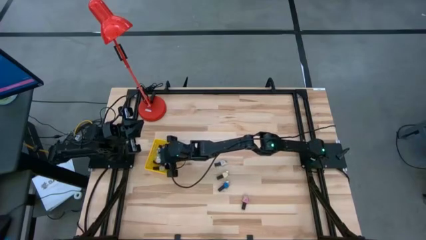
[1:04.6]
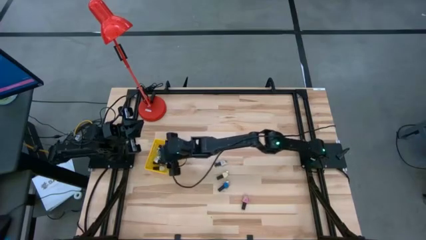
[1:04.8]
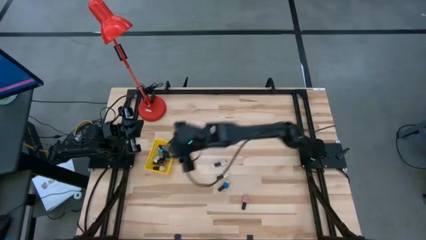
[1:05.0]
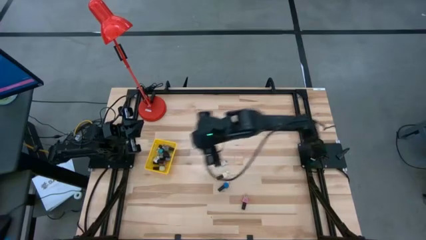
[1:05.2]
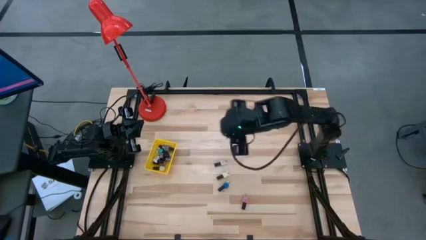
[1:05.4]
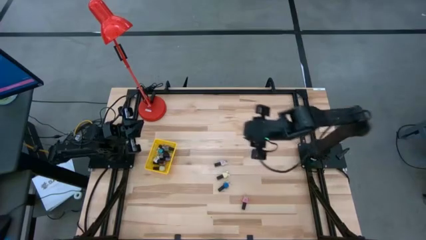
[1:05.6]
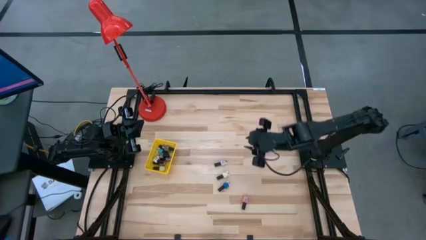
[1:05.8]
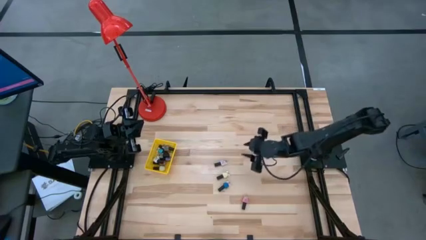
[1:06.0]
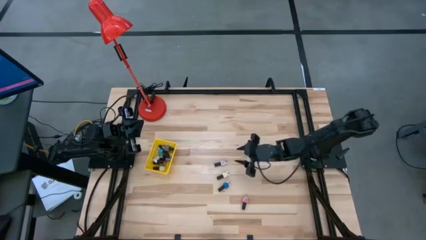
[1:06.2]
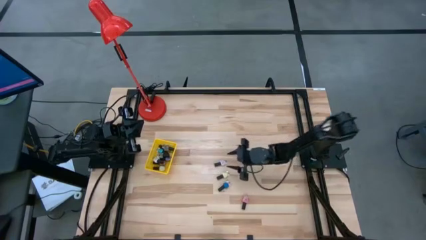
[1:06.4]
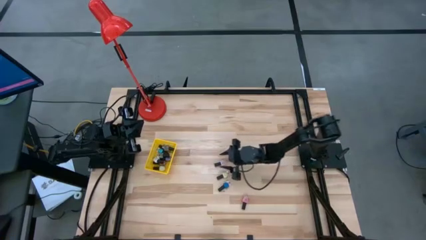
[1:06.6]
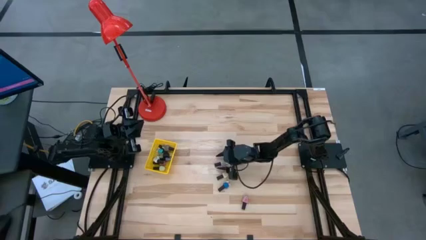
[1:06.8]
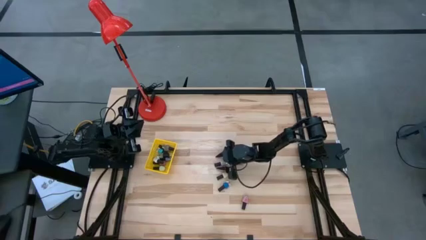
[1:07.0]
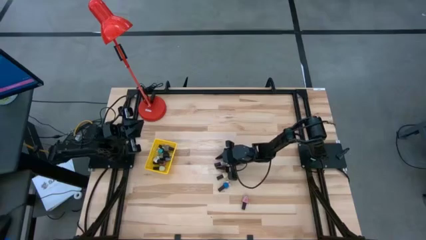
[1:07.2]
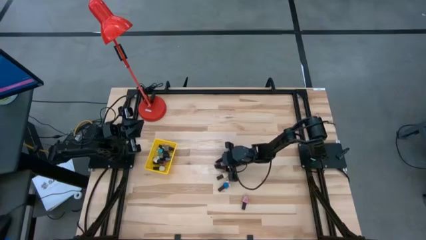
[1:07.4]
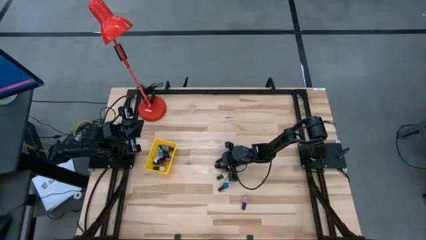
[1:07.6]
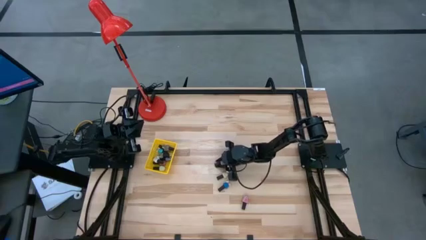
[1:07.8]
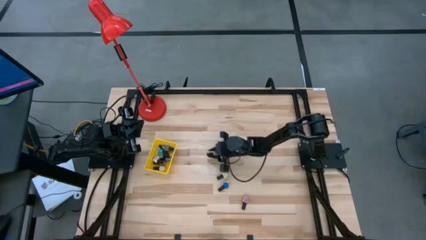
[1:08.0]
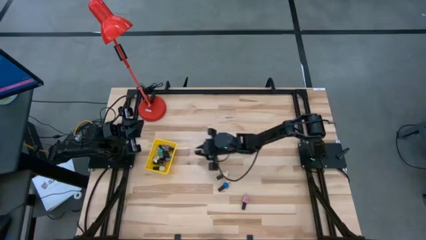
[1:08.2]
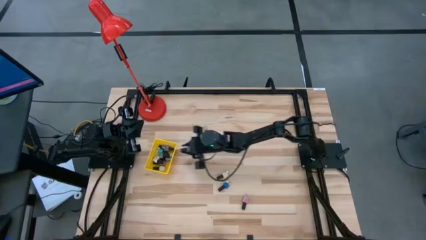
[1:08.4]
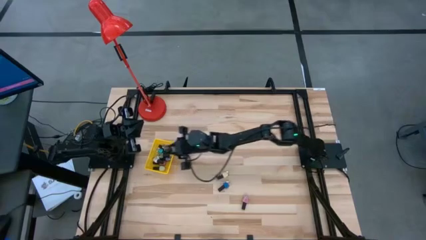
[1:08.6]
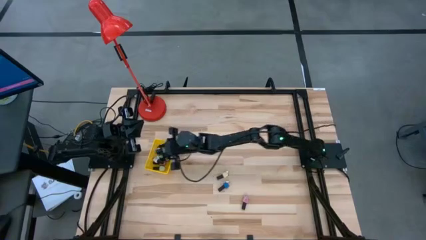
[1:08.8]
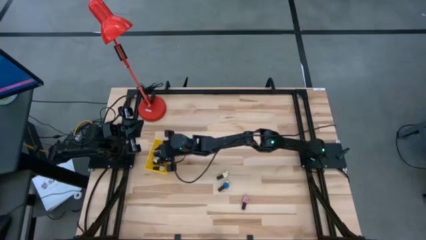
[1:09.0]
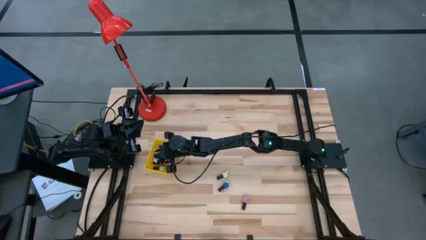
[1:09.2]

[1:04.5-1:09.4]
Task: Pick & Place Nail Polish
Put the silver nail polish bottle into the yellow basket

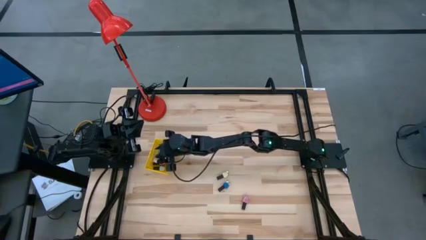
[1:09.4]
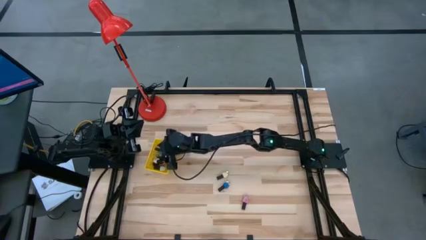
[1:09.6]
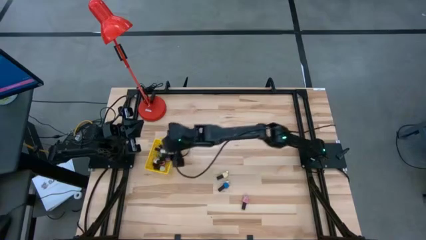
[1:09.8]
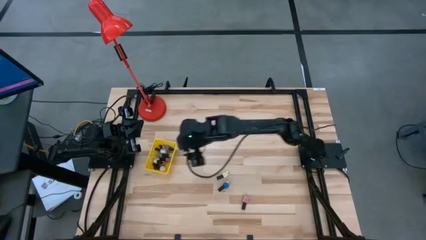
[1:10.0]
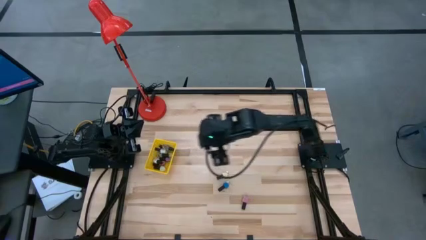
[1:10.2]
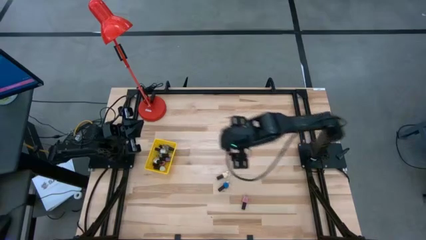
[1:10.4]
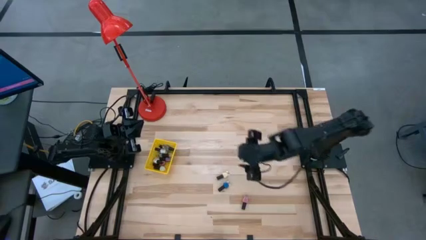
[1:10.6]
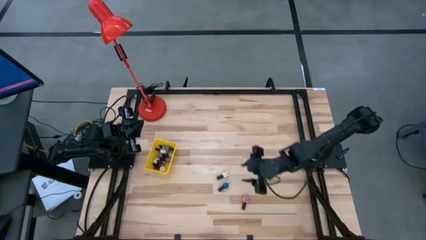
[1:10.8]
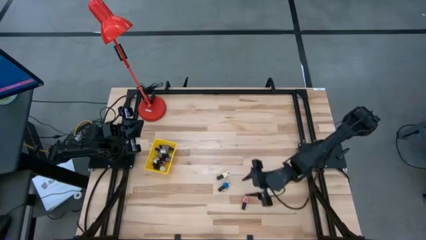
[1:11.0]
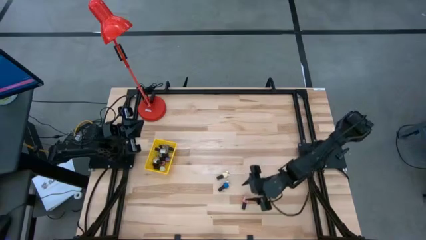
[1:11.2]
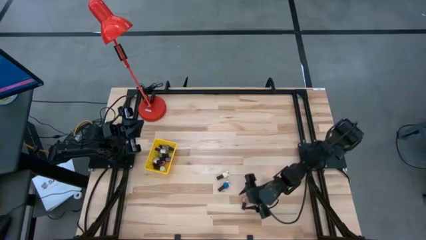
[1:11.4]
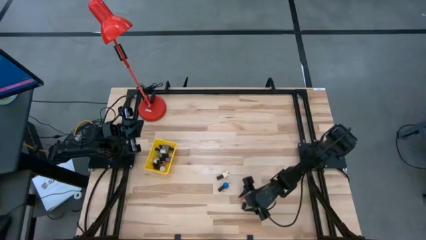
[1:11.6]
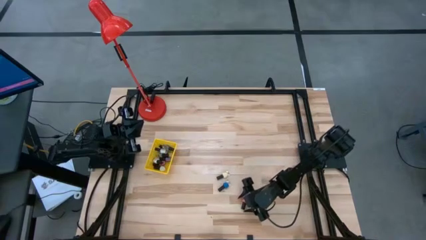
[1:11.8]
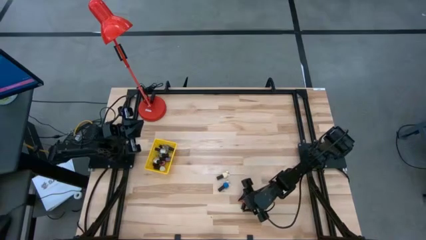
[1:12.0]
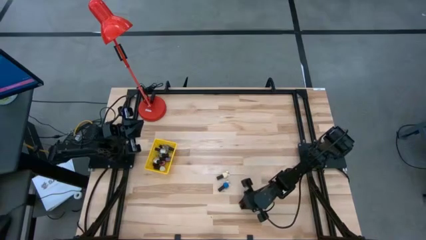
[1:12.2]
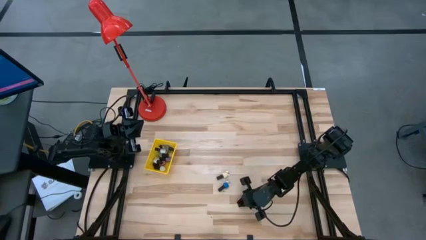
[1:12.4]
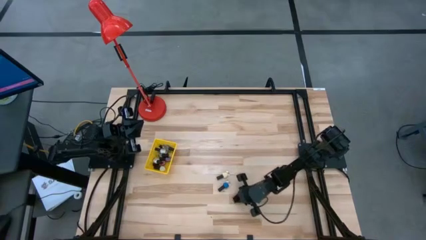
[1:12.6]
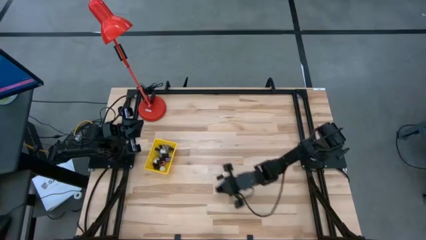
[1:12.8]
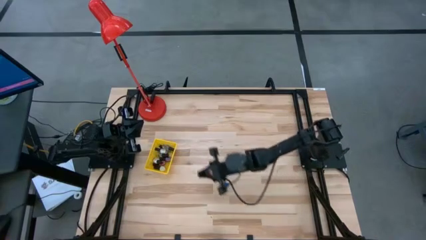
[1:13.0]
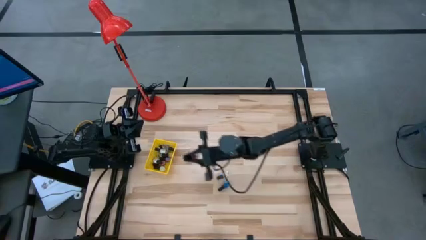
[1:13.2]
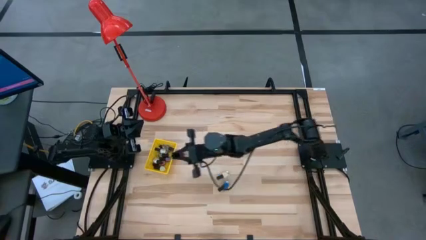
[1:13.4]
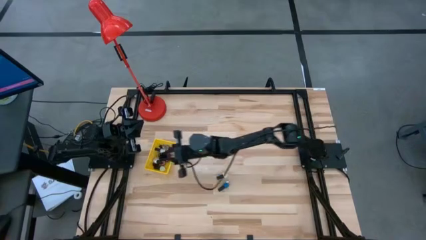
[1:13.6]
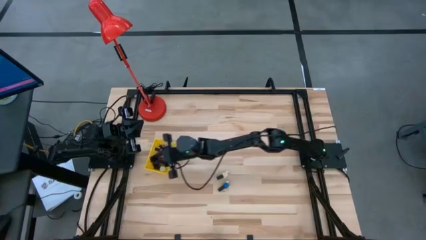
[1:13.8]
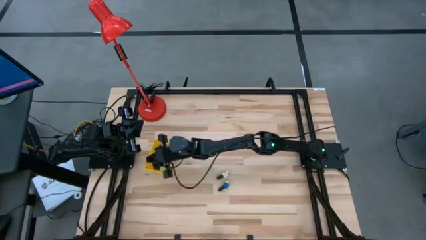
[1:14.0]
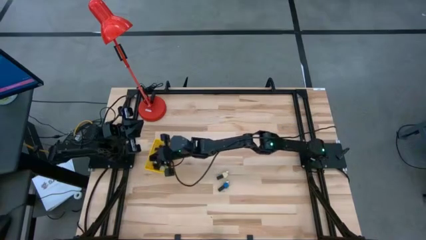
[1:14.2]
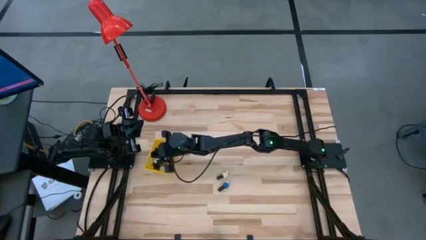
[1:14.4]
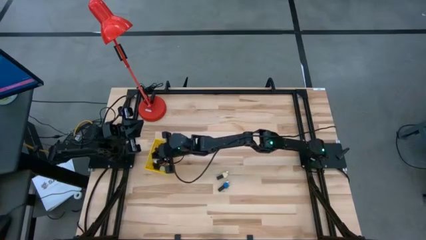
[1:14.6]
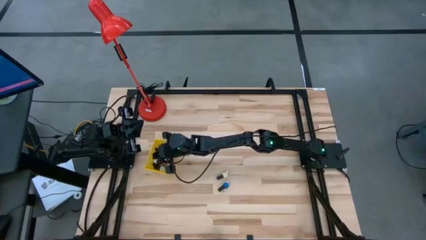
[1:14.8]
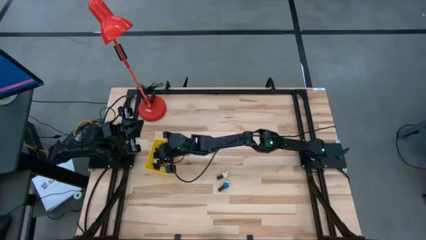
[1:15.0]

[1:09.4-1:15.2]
Put the pink nail polish bottle into the yellow basket

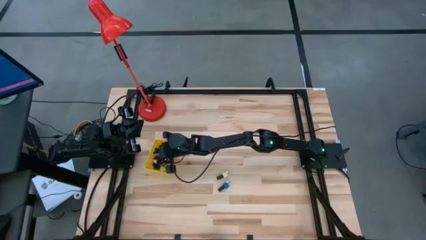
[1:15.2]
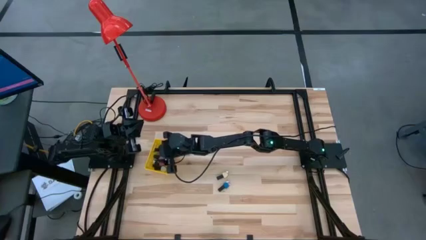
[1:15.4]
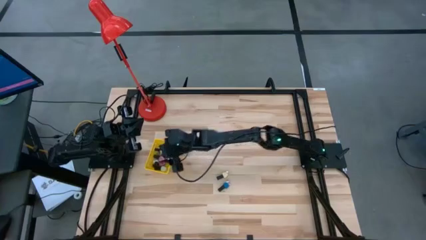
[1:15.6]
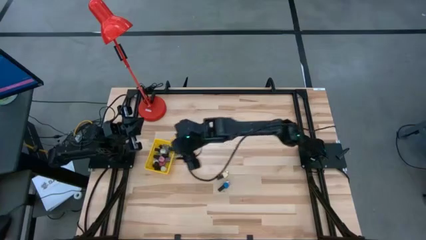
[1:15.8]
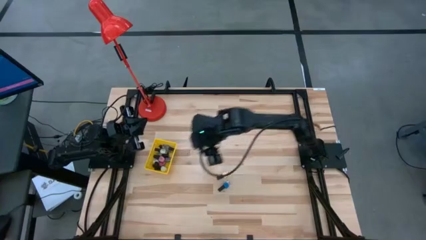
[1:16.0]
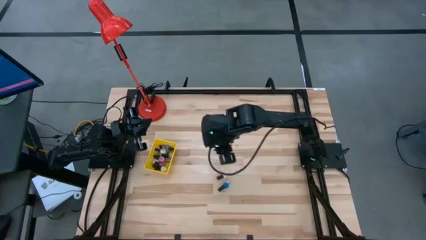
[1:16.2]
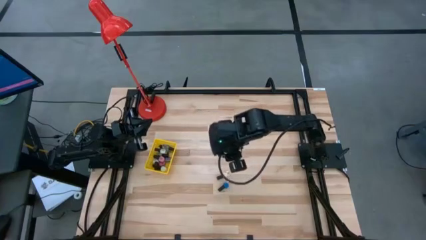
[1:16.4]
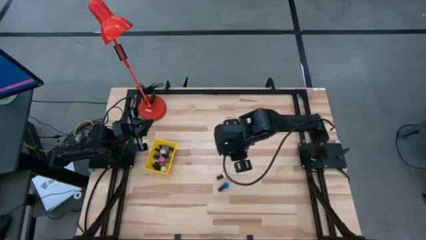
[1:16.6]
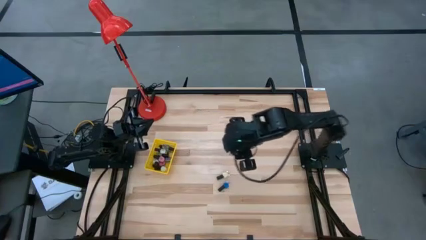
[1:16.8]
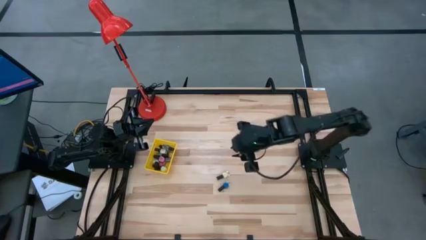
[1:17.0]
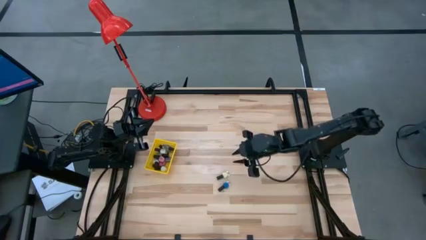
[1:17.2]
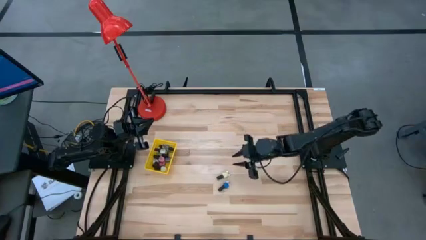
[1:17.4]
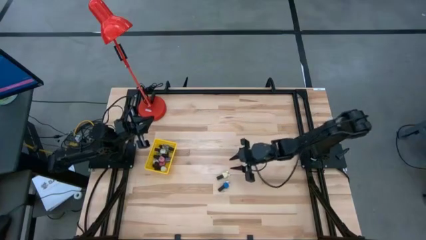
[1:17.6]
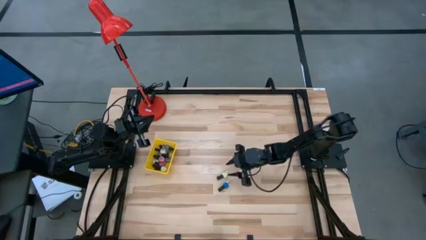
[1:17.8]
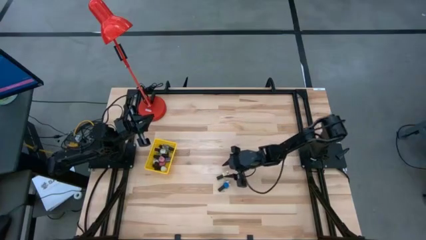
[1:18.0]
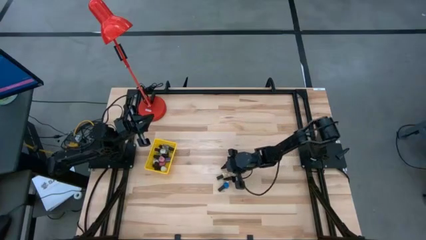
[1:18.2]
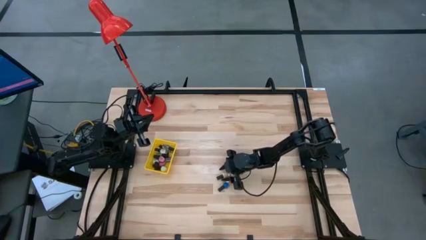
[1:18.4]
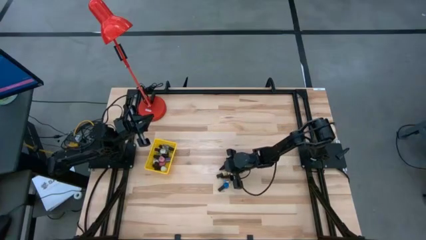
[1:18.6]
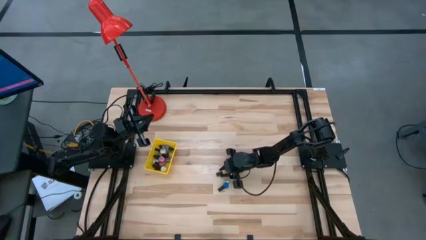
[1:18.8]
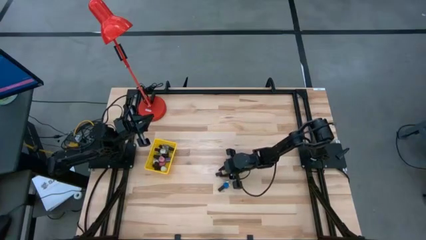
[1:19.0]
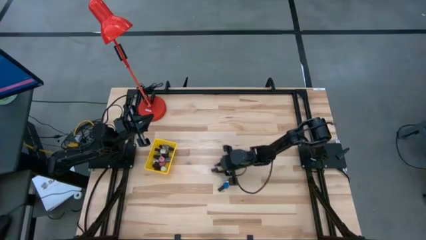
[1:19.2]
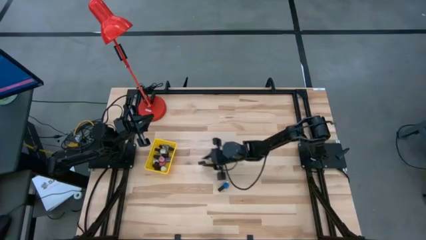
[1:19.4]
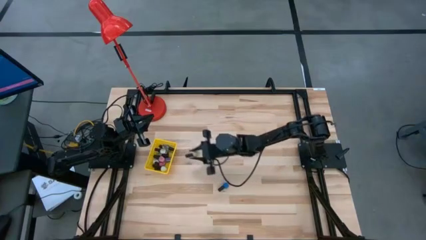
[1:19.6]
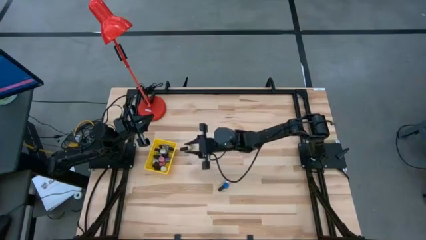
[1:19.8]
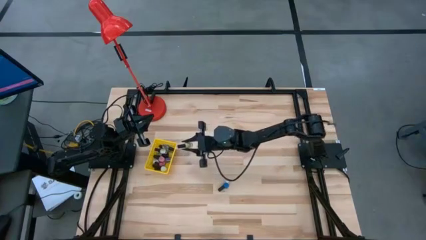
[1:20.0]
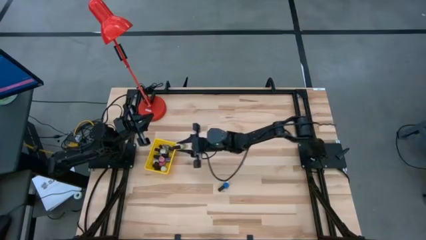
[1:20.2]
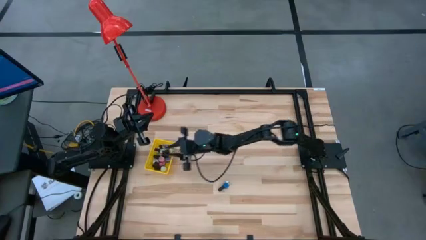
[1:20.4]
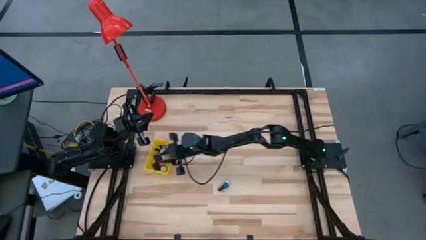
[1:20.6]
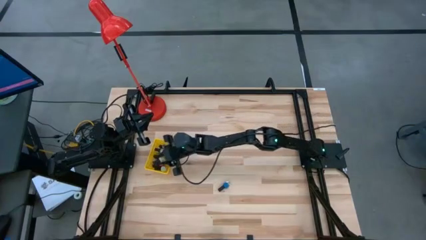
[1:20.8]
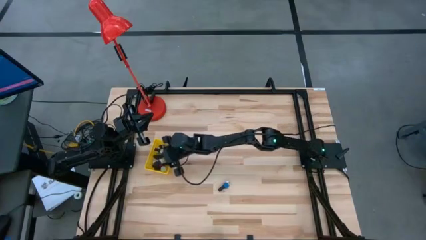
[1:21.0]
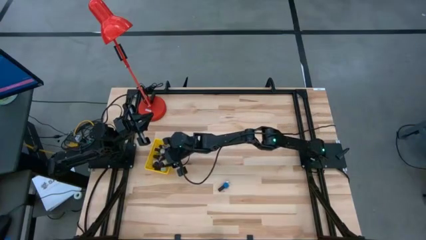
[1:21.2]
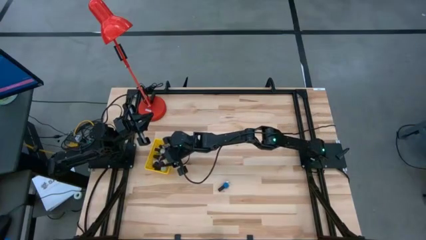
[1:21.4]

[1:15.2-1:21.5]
Put the yellow nail polish bottle into the yellow basket
